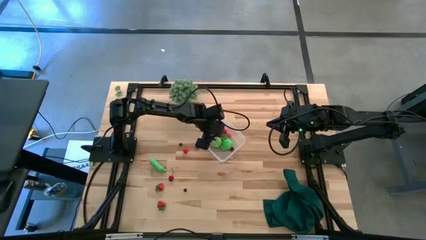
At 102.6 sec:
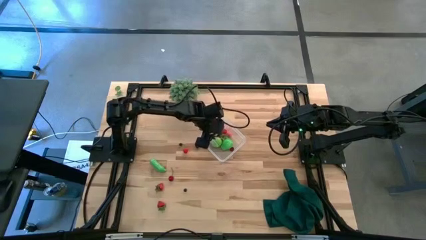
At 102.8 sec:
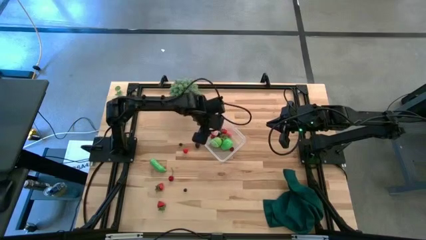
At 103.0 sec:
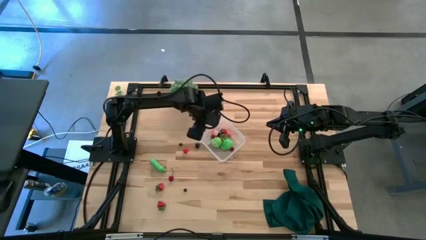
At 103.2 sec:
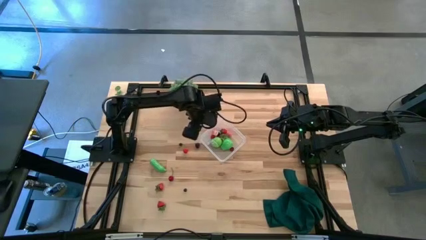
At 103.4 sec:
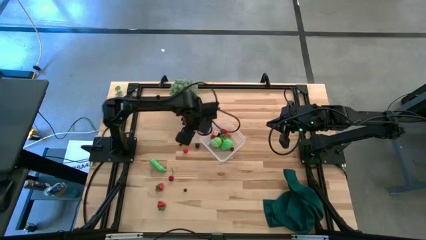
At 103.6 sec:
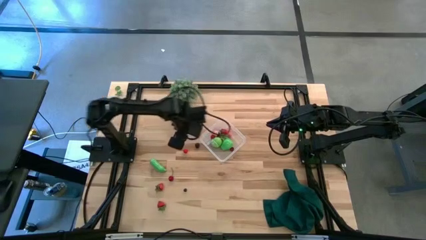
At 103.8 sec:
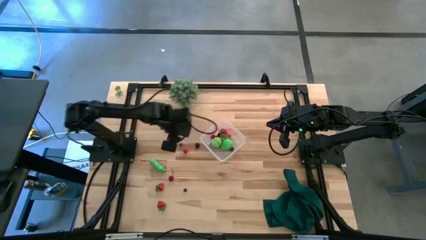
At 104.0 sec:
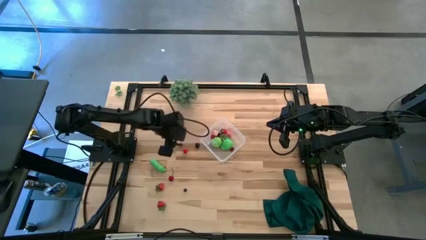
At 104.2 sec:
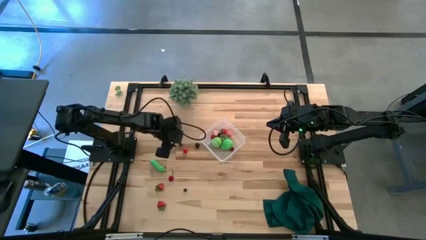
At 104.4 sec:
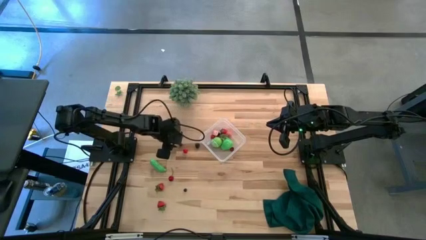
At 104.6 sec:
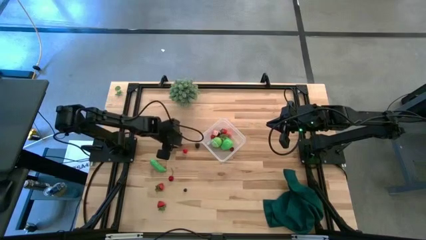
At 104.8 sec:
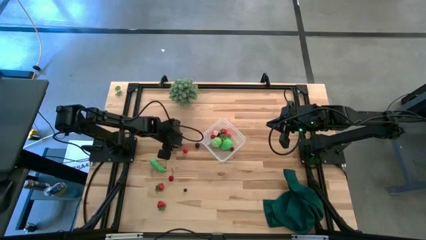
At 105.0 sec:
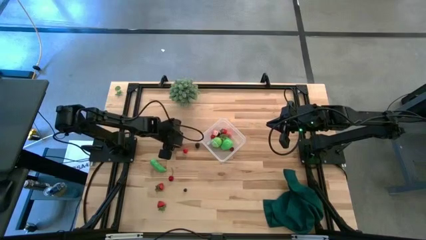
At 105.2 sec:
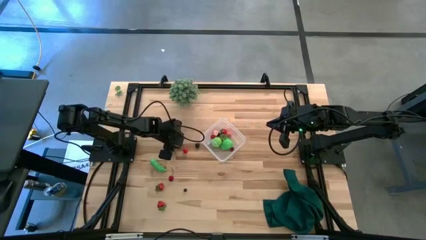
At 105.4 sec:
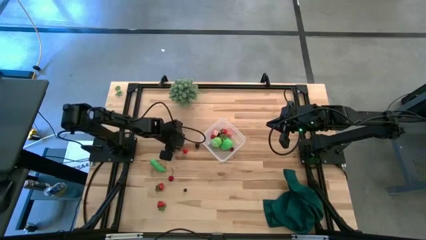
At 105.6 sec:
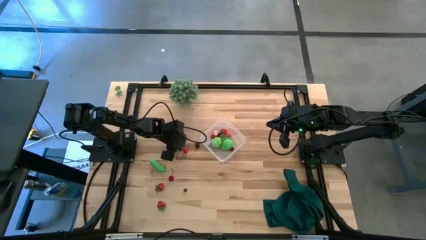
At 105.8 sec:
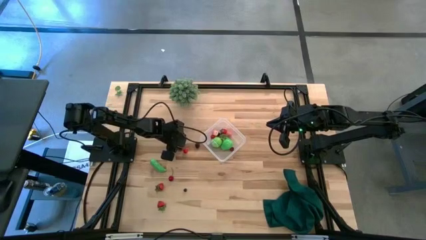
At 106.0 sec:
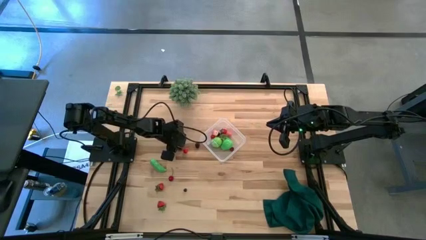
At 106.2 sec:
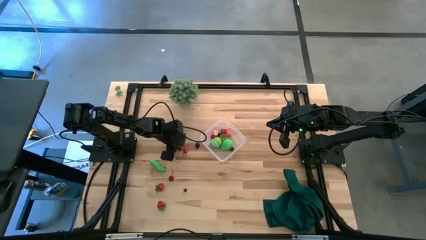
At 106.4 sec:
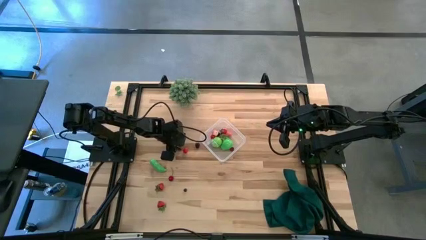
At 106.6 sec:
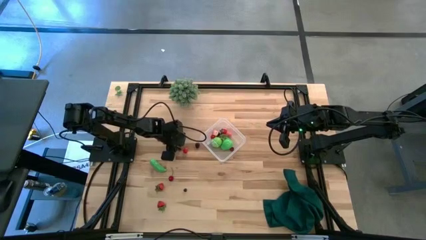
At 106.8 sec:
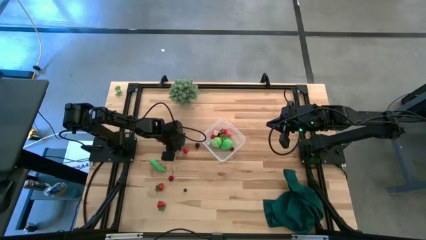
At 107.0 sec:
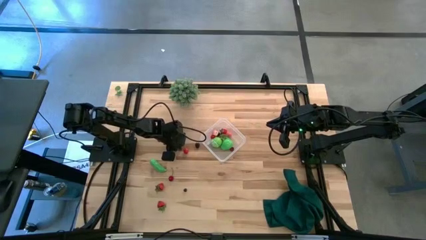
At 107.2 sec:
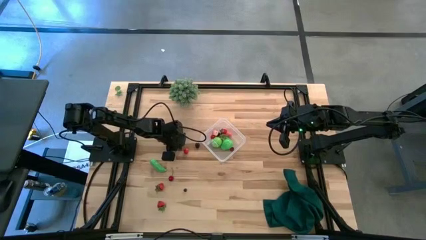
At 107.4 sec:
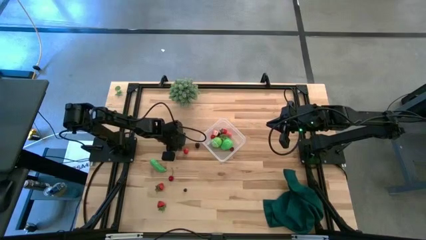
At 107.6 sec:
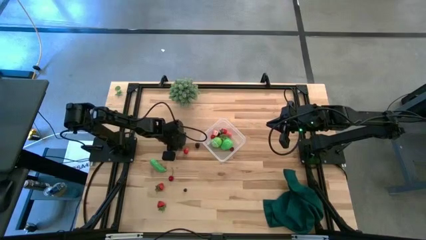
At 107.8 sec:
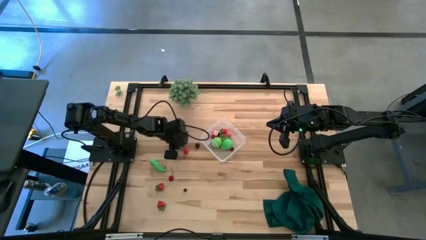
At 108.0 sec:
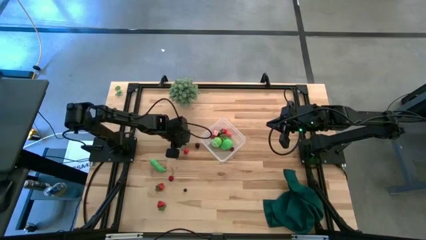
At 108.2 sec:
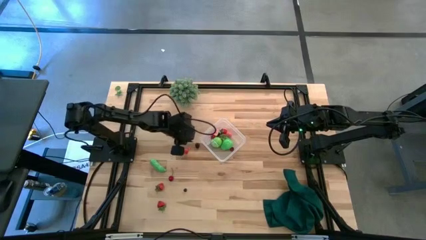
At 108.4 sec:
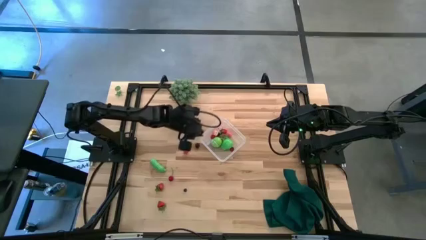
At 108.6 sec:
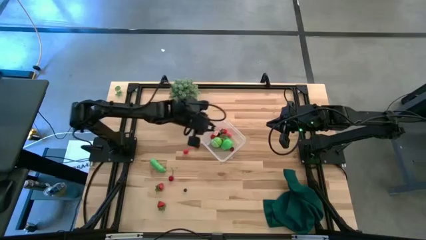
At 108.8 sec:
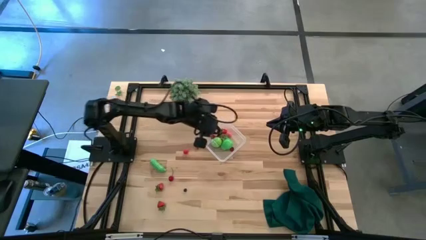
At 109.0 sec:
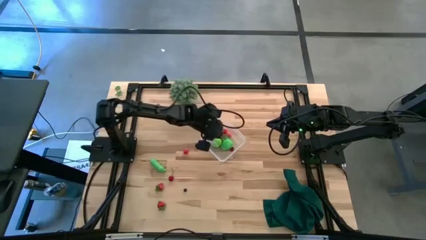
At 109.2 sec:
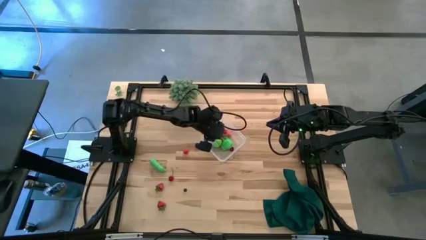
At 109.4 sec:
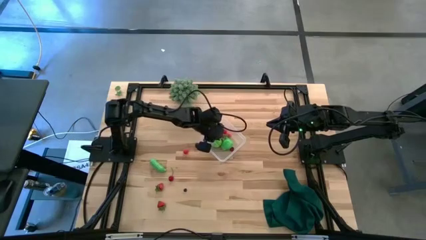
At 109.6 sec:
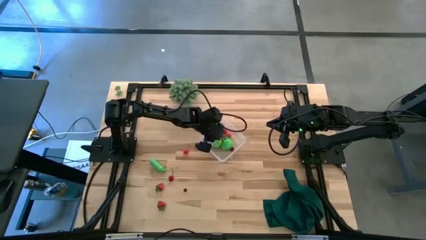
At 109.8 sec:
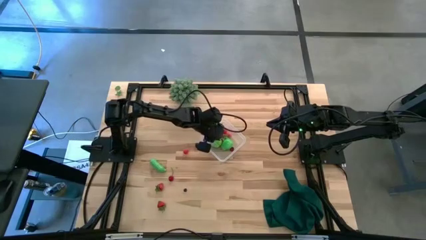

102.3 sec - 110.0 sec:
Task: Pick and placing Produce into tupperware
Put the blueberry into the transparent bin

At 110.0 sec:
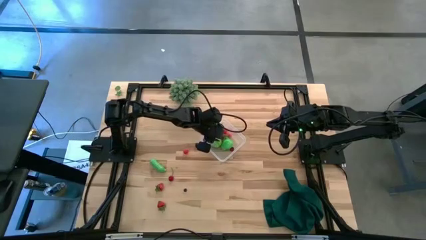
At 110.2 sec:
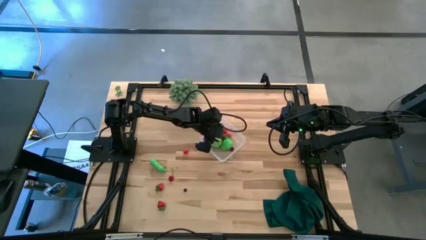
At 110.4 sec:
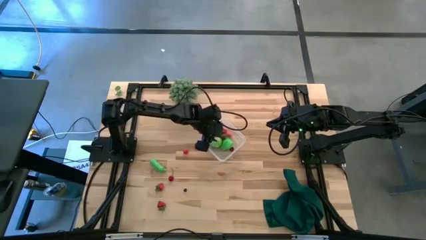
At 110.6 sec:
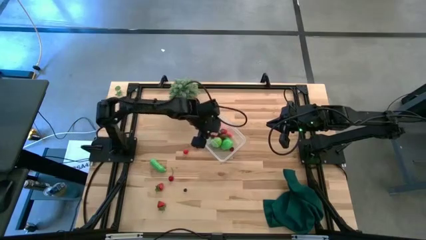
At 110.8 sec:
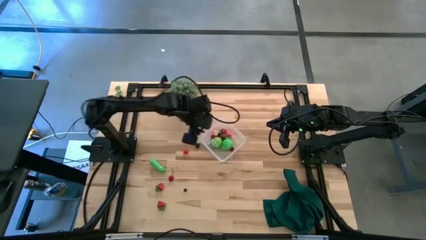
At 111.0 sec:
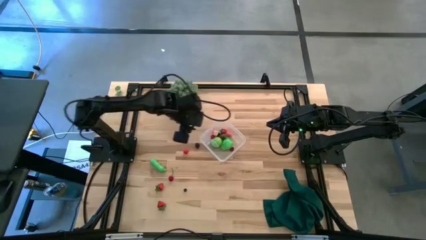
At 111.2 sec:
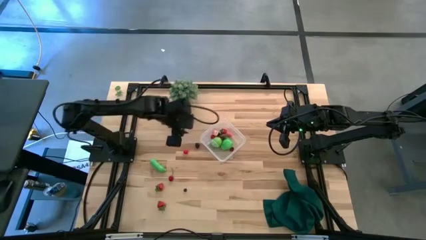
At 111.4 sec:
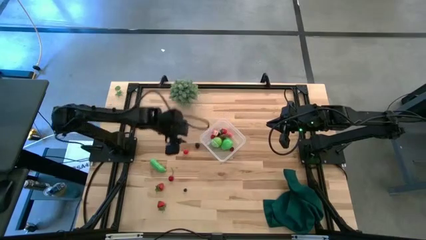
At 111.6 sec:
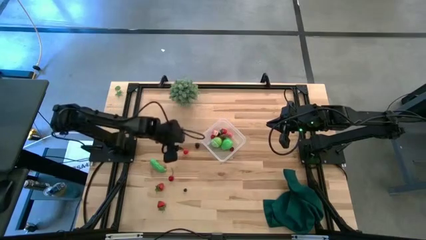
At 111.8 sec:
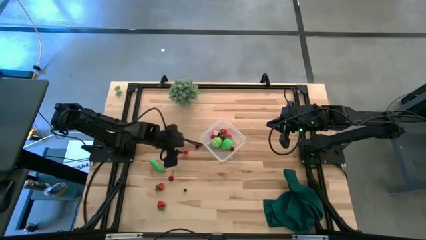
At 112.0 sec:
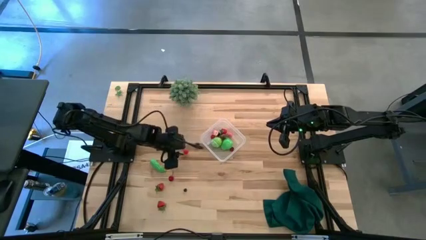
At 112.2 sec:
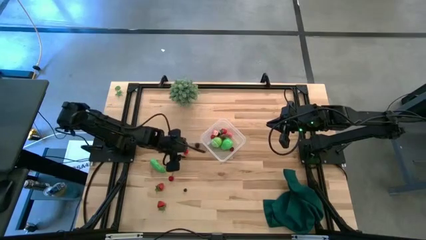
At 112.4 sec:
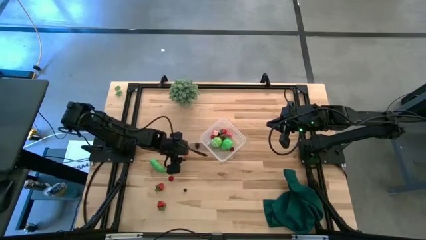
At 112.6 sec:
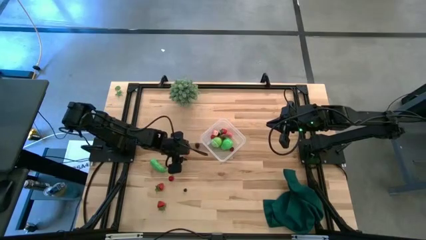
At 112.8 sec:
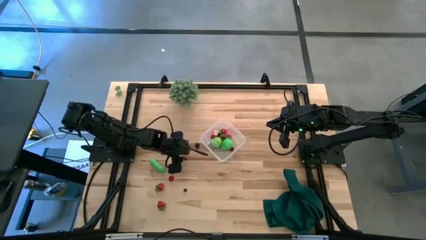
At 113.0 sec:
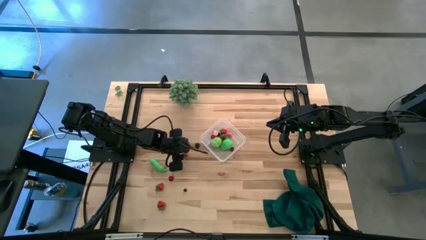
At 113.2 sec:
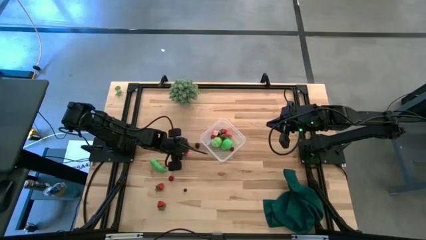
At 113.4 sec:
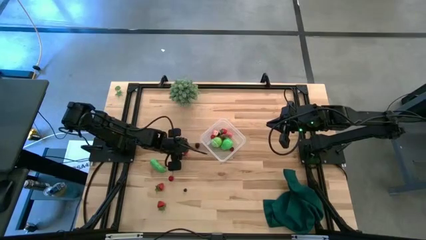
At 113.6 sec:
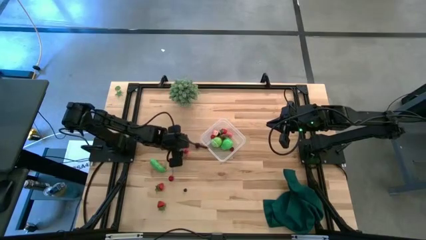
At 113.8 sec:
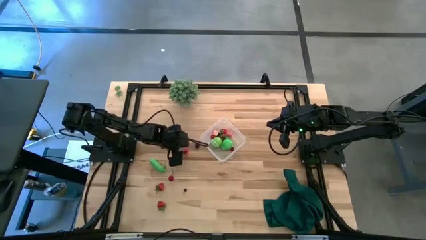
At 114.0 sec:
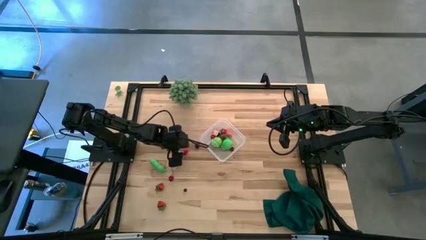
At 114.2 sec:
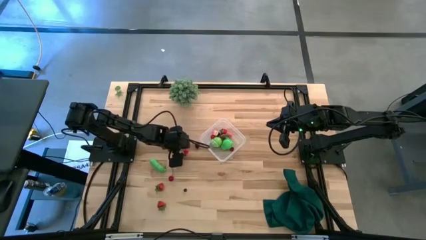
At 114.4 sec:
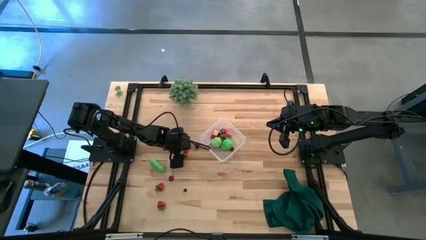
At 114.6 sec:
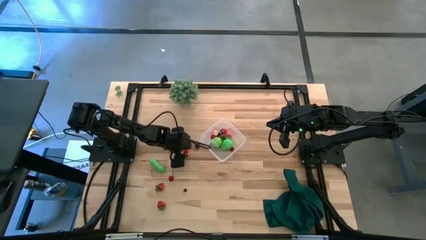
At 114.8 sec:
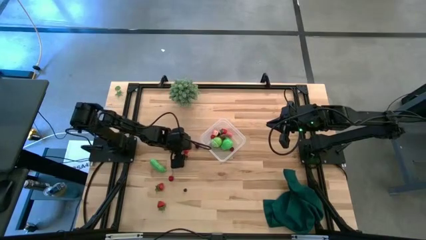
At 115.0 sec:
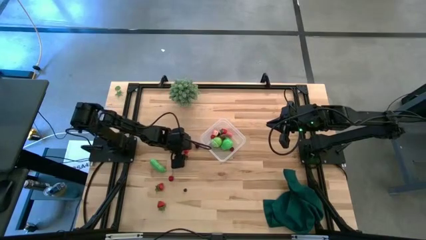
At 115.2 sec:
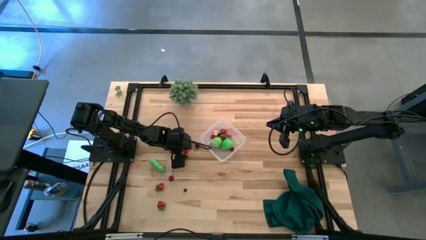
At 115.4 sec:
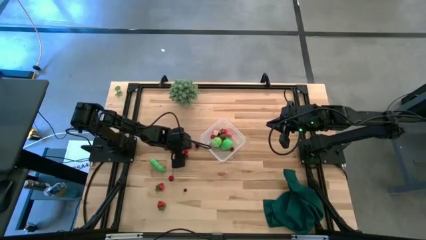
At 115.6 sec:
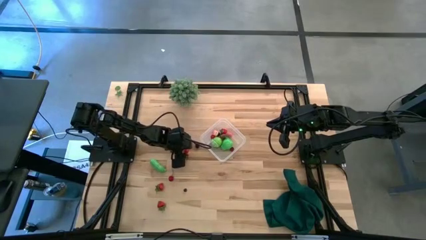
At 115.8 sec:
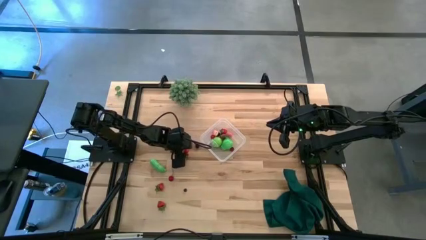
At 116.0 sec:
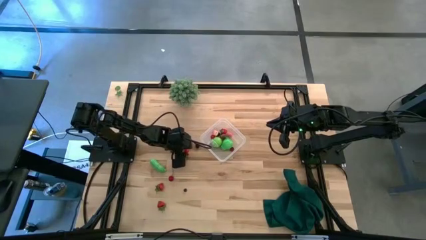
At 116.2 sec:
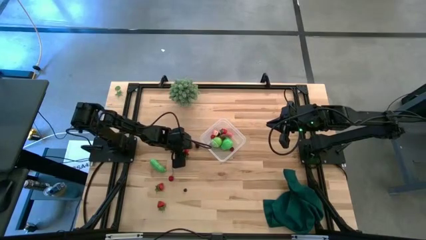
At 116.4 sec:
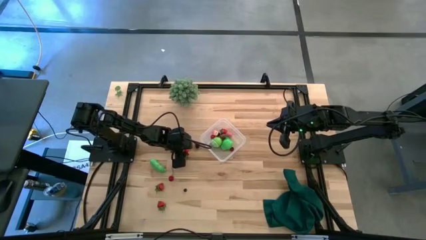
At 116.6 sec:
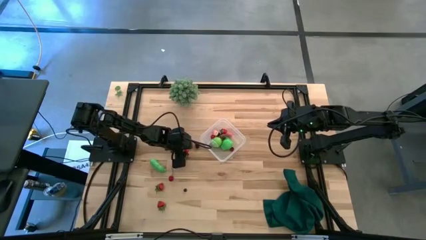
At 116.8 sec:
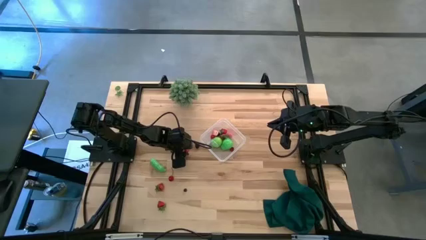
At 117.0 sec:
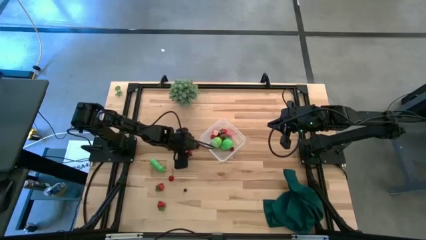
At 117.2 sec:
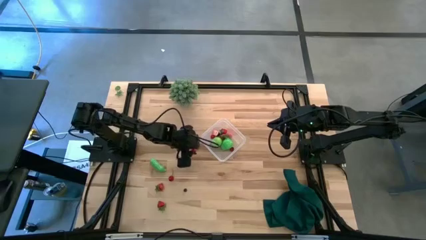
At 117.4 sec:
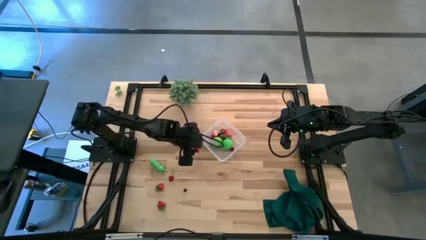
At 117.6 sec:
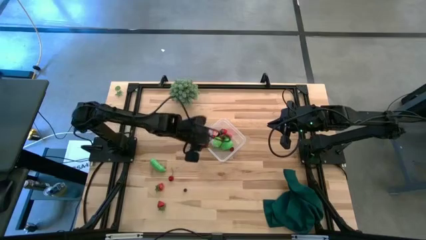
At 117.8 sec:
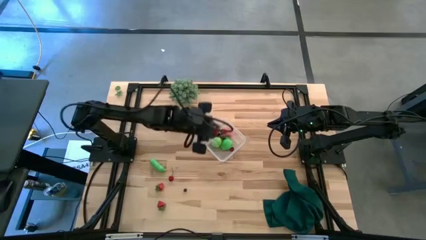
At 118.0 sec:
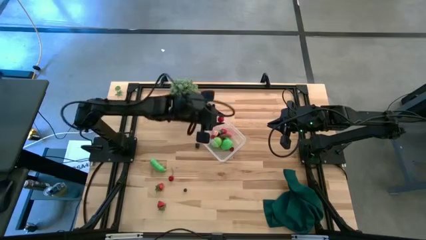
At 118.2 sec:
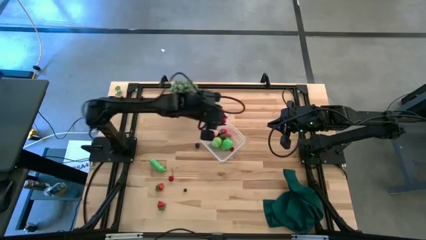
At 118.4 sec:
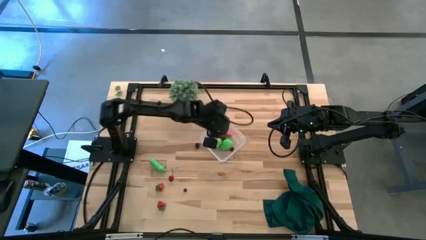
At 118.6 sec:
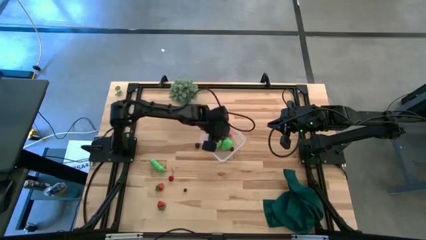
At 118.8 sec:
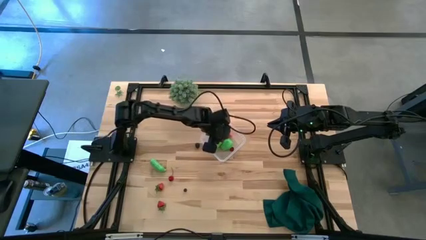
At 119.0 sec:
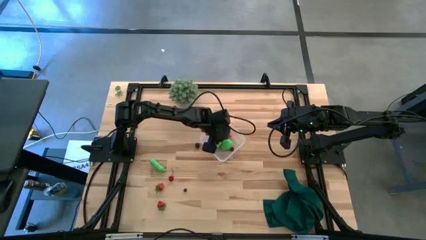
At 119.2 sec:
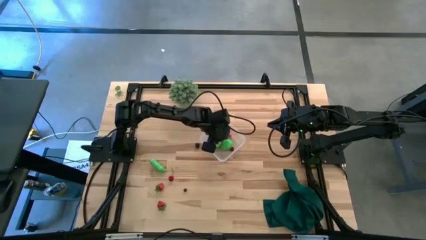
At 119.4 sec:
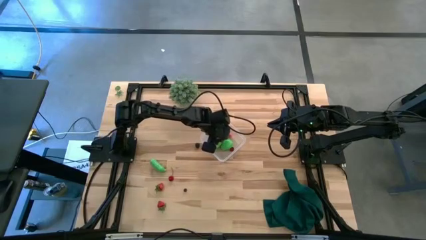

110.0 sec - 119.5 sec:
Put the red cherry into the transparent bin
